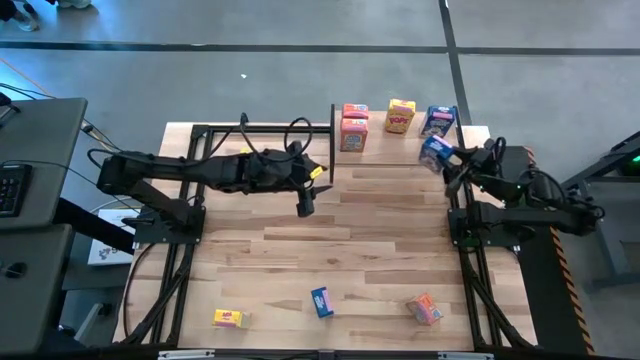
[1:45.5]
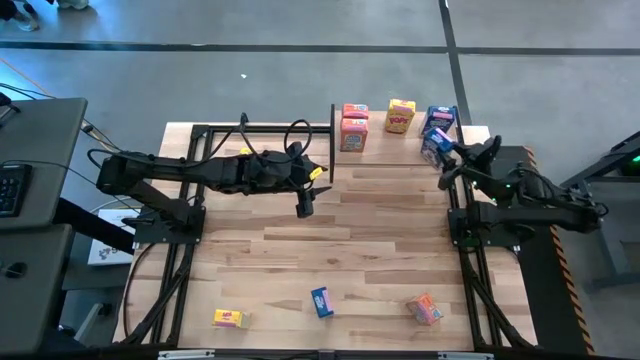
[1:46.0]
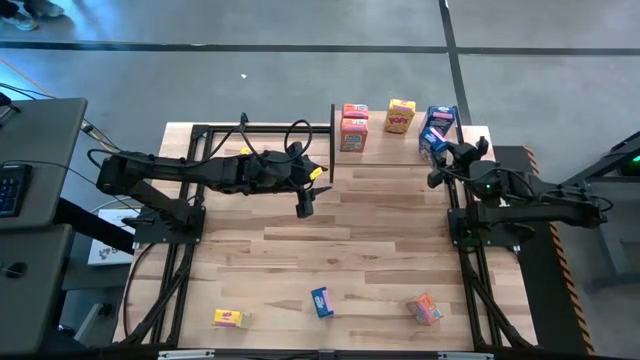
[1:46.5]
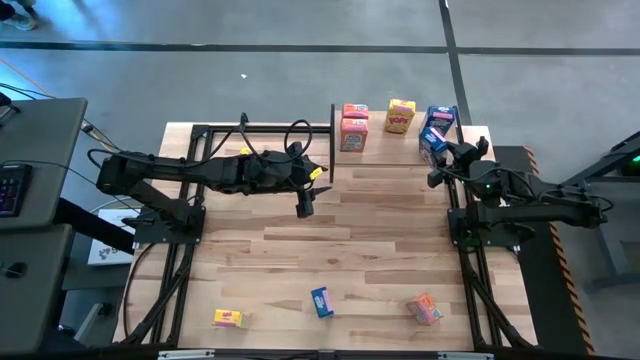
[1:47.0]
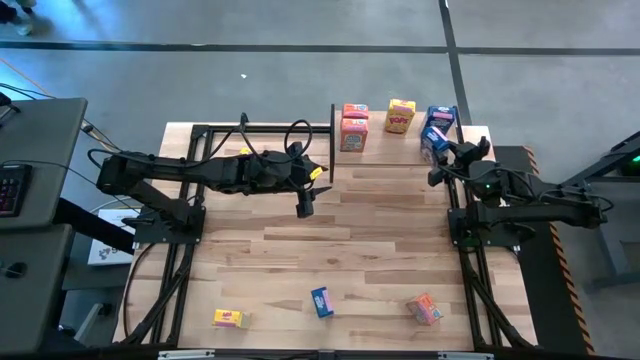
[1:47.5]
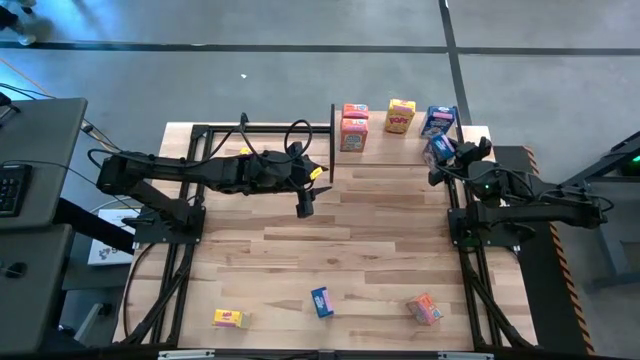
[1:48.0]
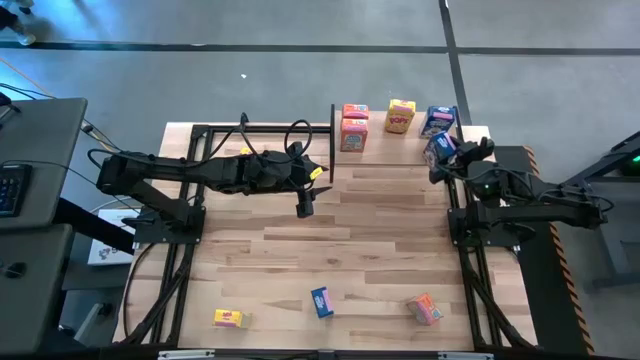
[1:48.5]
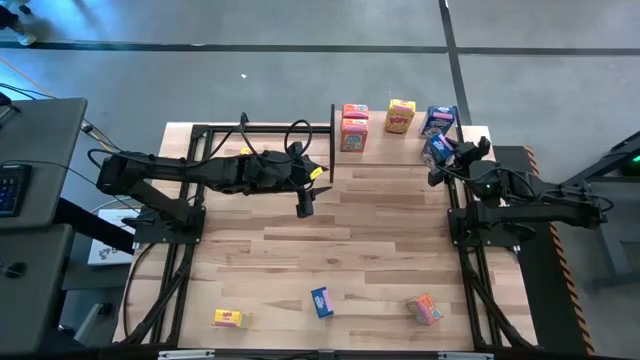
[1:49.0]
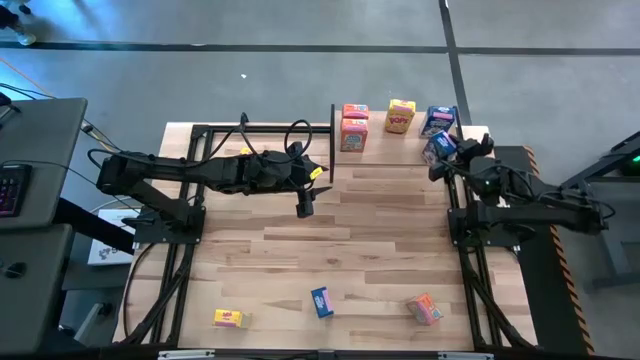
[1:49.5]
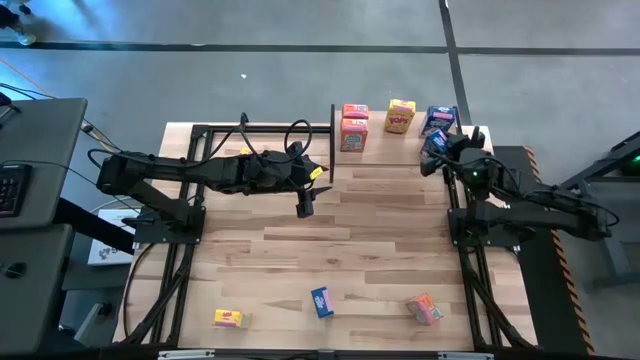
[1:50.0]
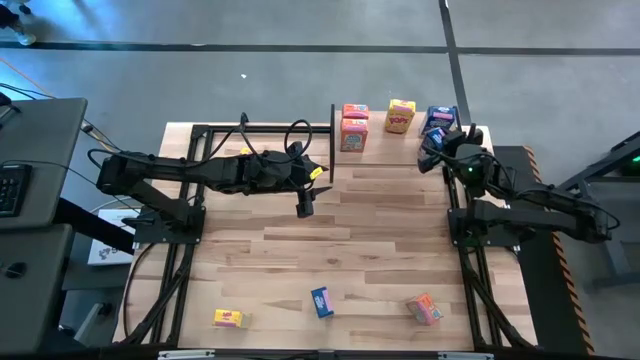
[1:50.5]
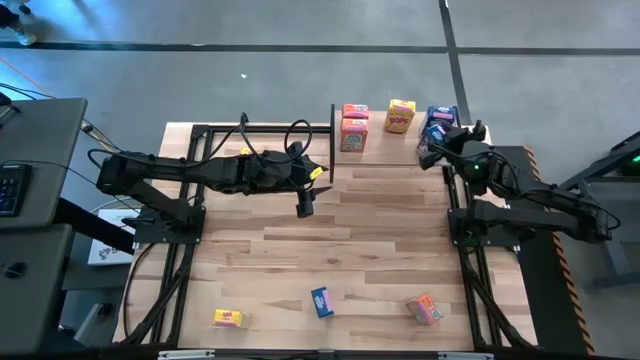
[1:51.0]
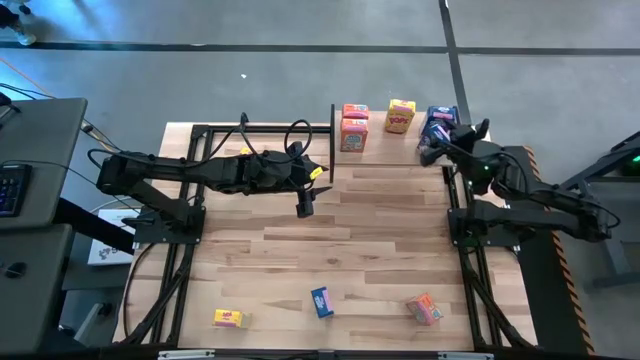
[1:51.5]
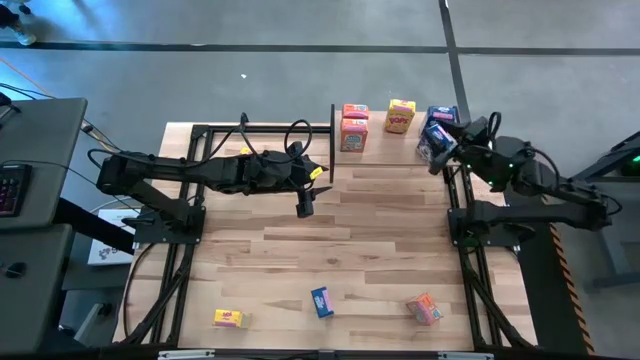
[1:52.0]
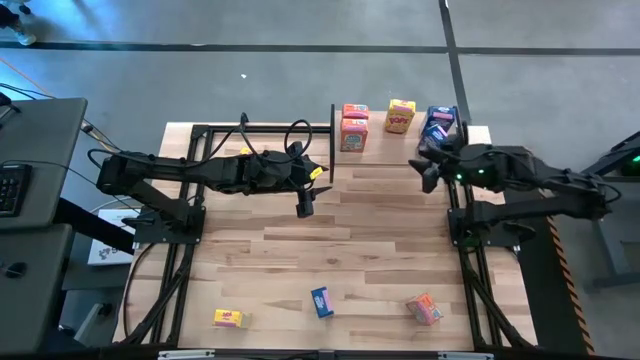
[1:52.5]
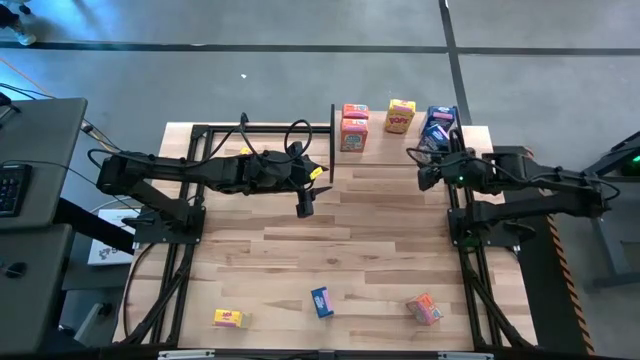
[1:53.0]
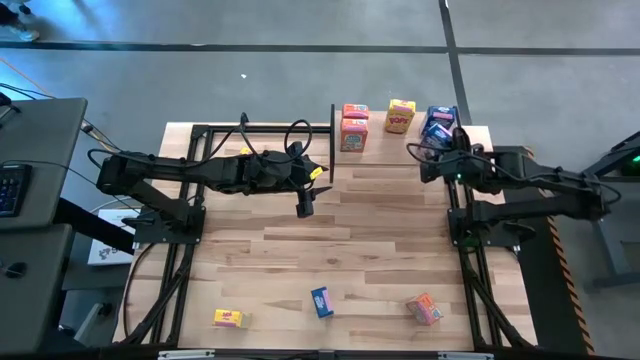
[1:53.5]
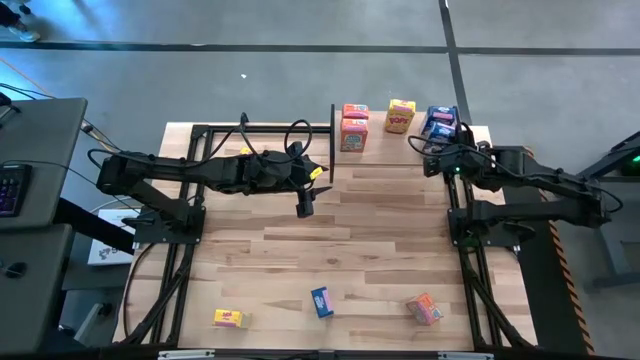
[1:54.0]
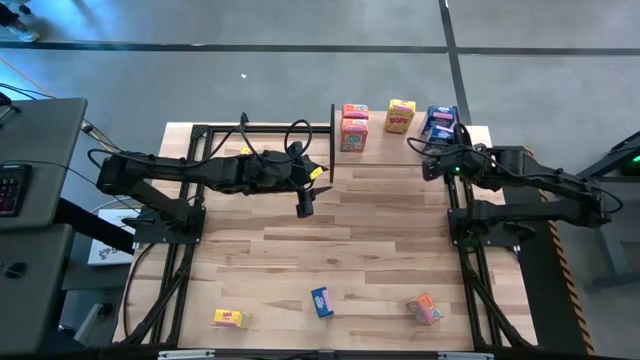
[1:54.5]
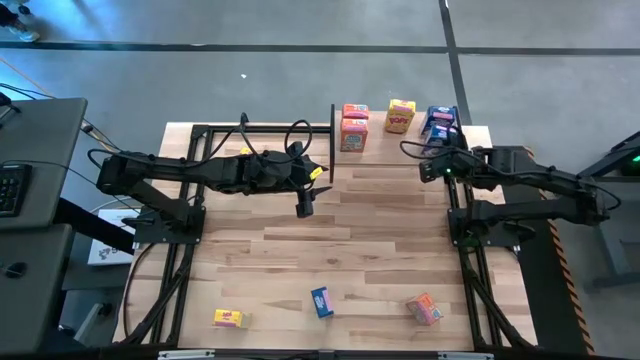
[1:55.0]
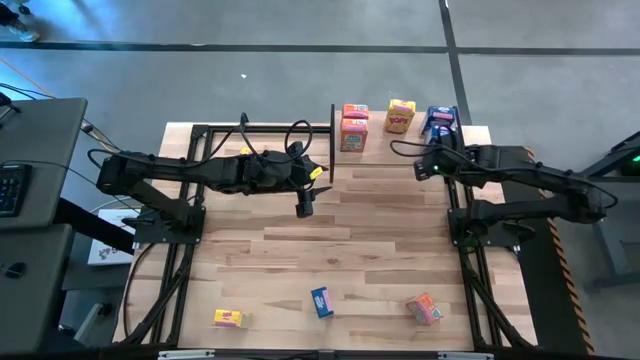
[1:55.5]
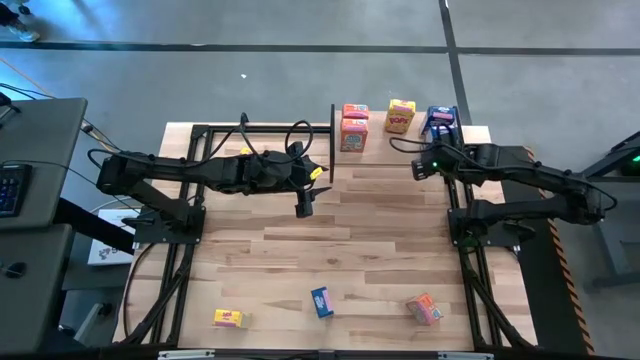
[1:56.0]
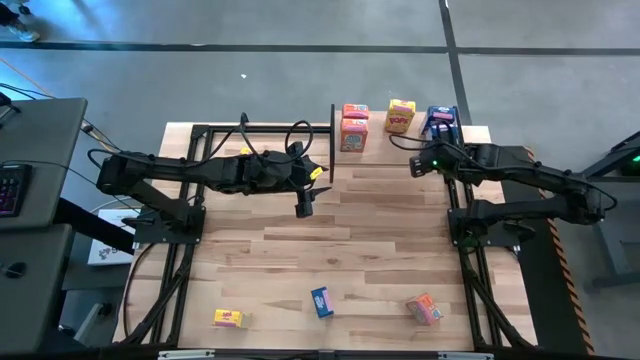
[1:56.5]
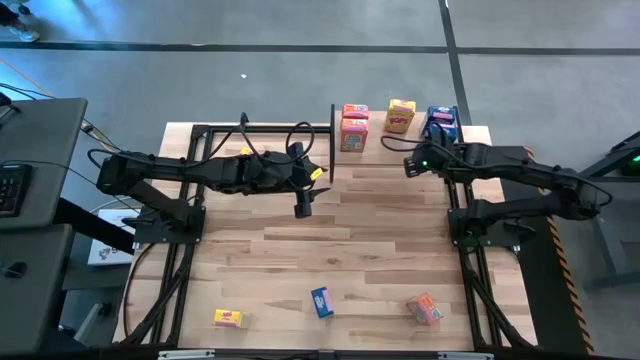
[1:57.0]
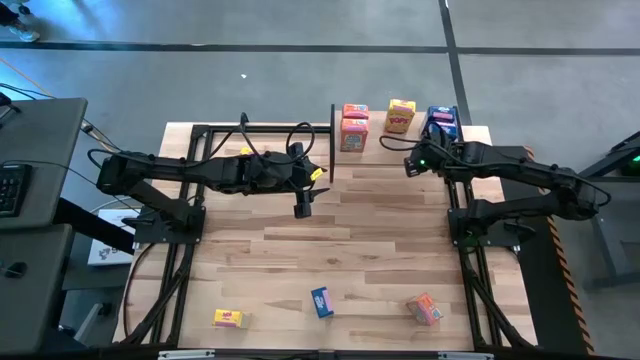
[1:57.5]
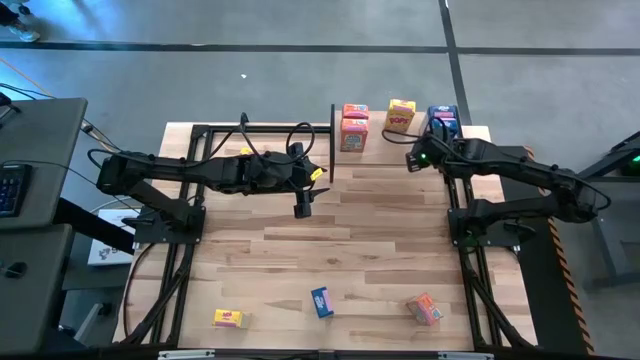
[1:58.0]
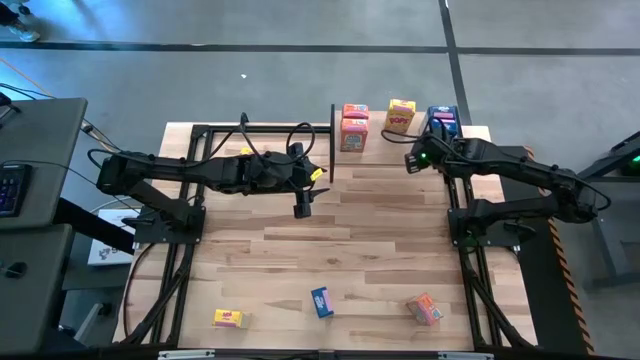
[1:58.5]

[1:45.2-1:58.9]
Task: Stack cereal on shelf
Put the top blue cereal box on the shelf aligned with the other blue cereal box

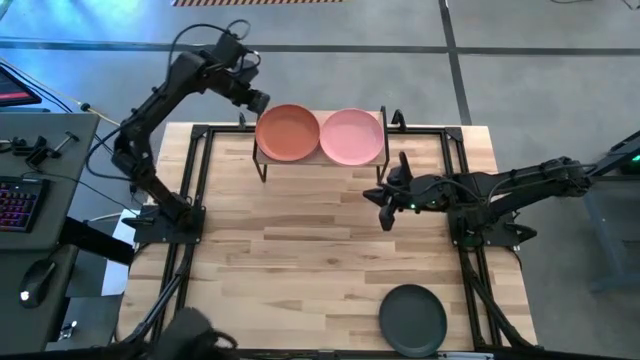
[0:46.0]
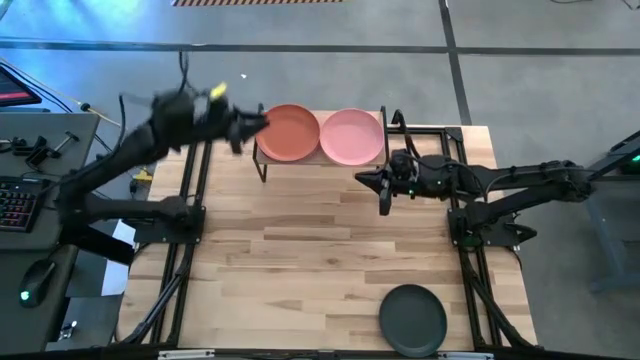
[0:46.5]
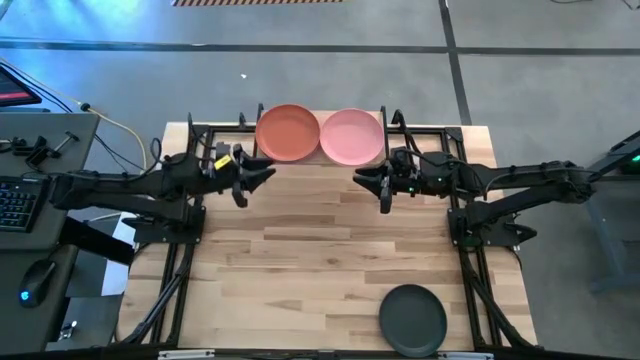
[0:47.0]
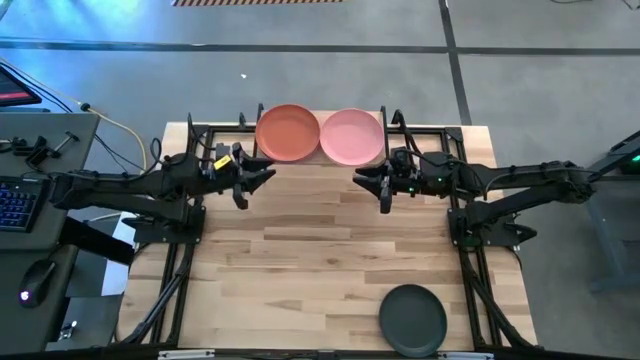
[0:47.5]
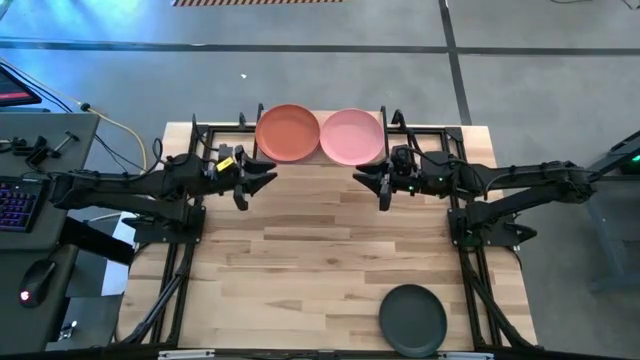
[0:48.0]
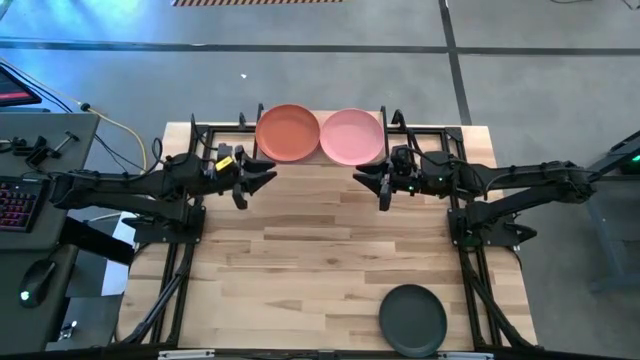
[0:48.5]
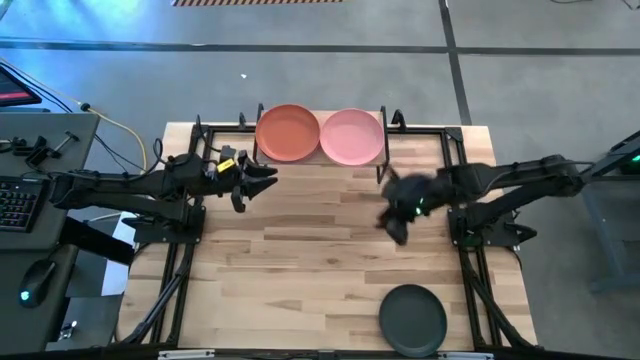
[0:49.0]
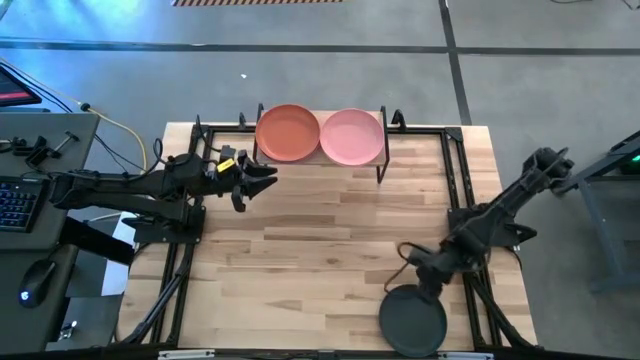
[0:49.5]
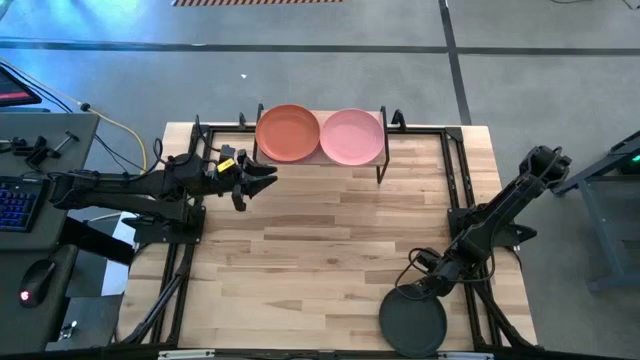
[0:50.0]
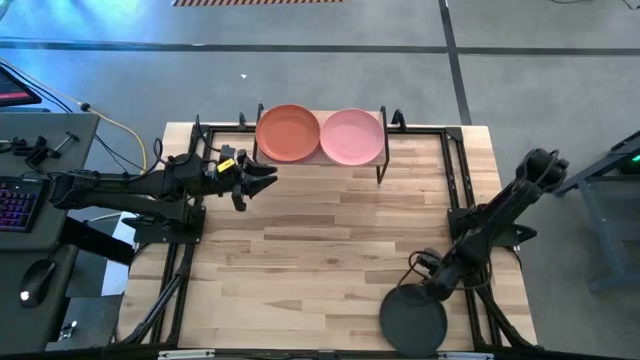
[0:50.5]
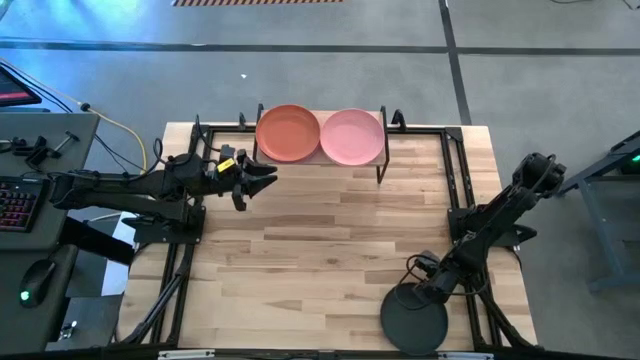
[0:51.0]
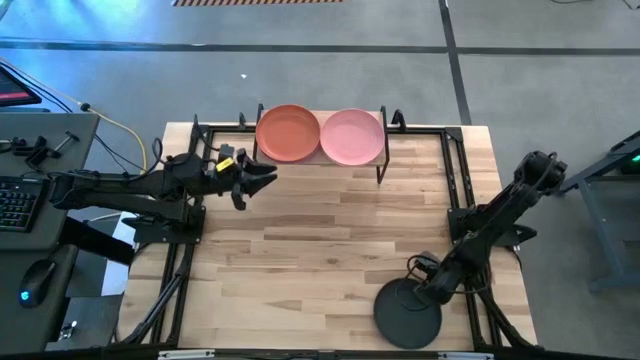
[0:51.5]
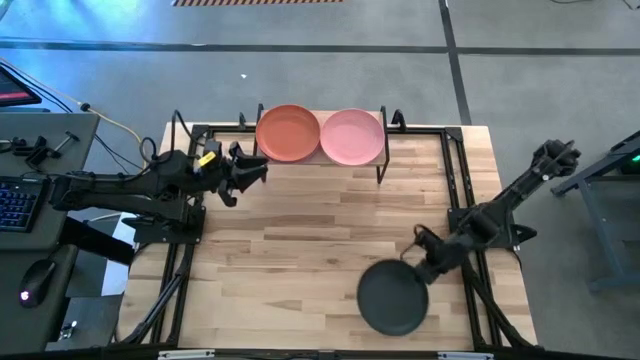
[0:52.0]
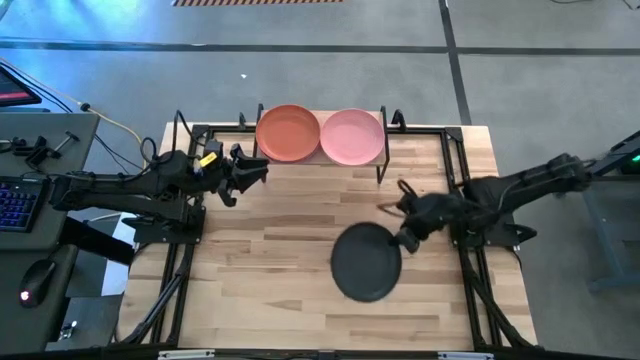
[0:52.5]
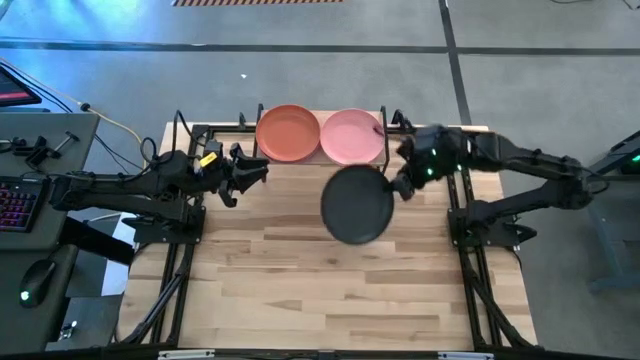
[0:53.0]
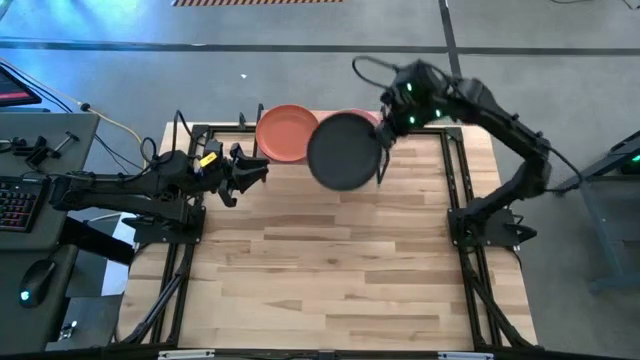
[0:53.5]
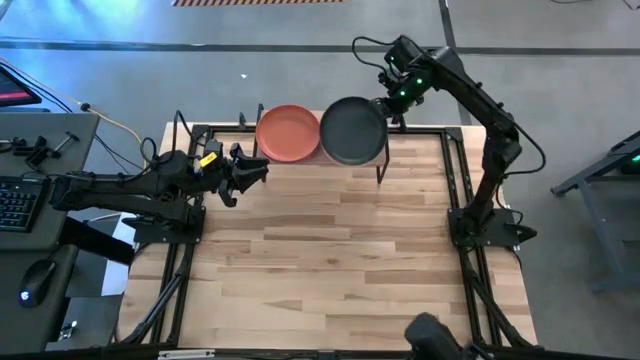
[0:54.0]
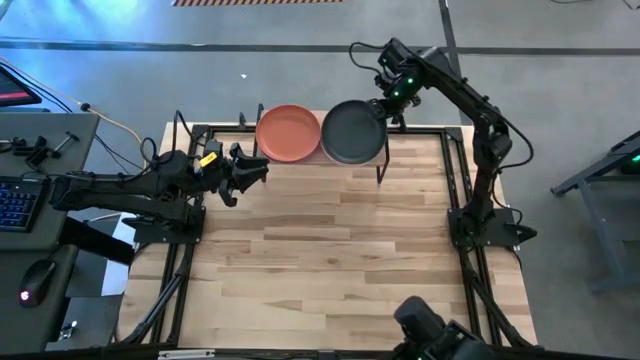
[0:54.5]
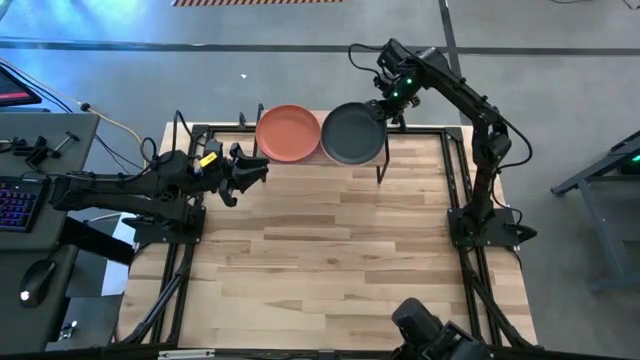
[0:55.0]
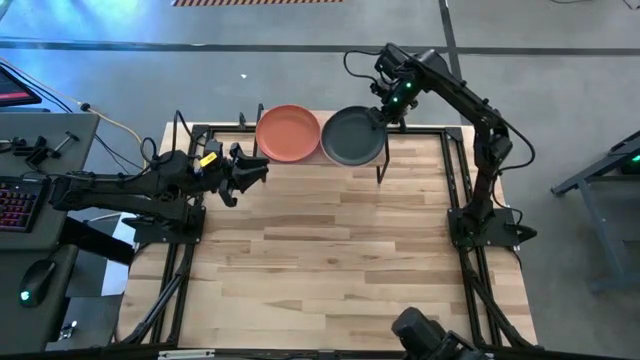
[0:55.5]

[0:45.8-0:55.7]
Task: Place and stack plates onto a shelf
Stack the black plate on the light pink plate on the shelf
